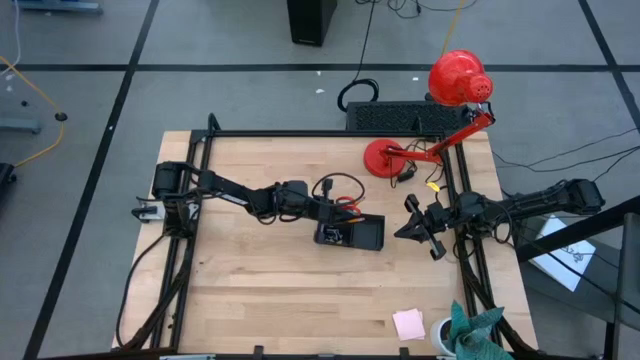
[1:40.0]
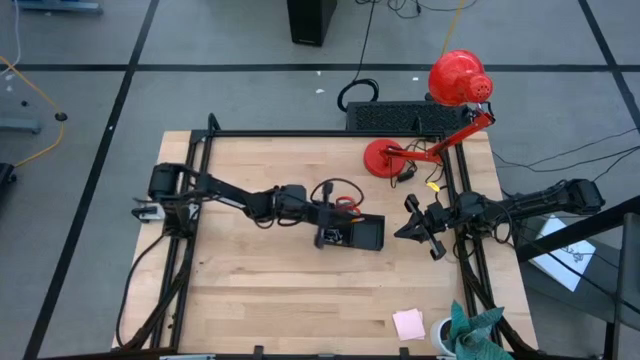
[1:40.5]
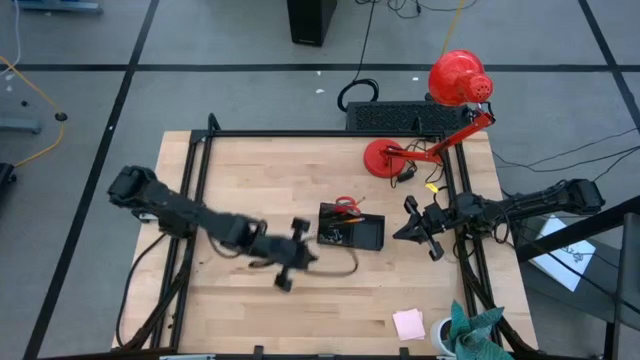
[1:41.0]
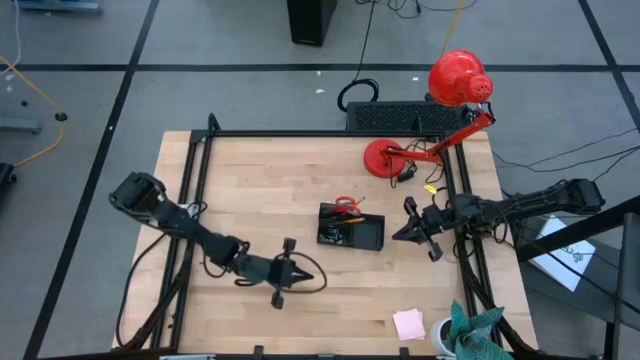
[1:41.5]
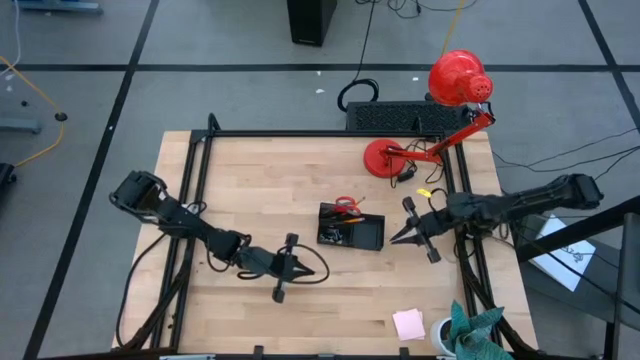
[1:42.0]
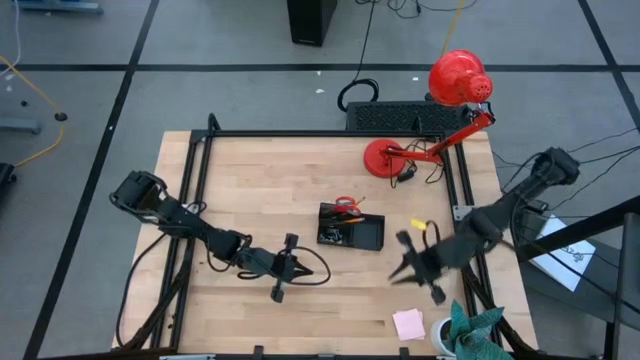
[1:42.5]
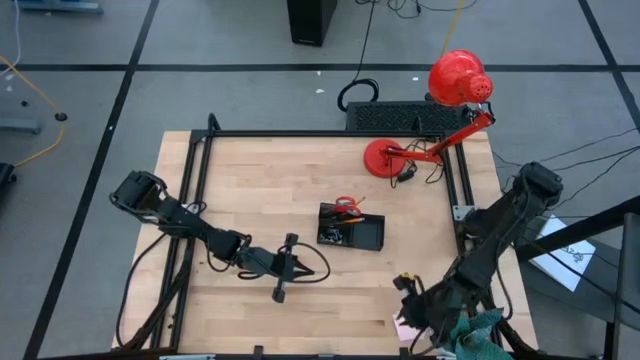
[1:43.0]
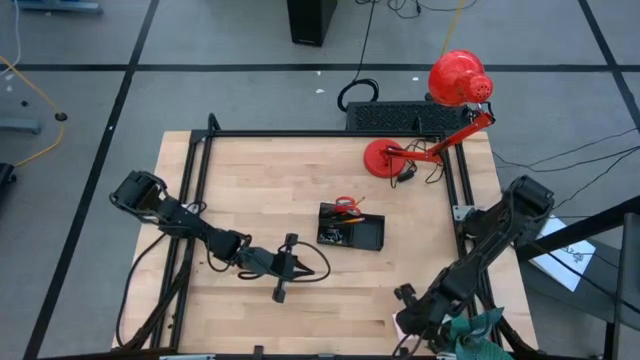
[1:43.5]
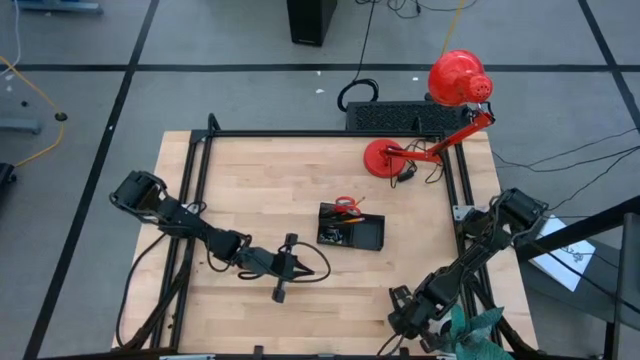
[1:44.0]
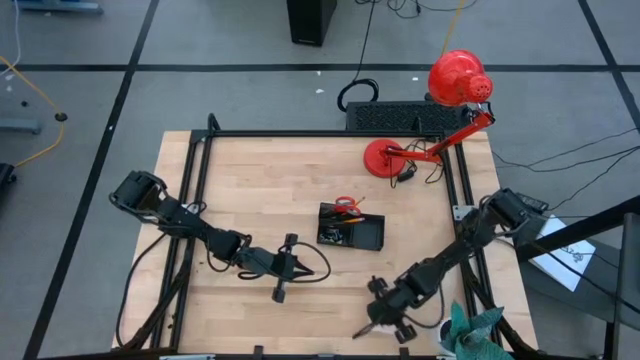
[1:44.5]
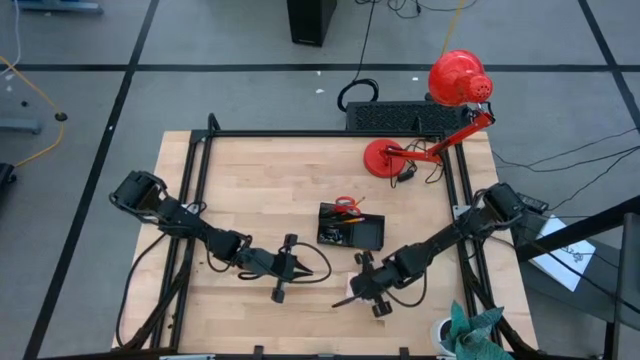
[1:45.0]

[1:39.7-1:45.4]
Task: Pick and place office supplies into organizer
Move the sticky notes to the center of the table

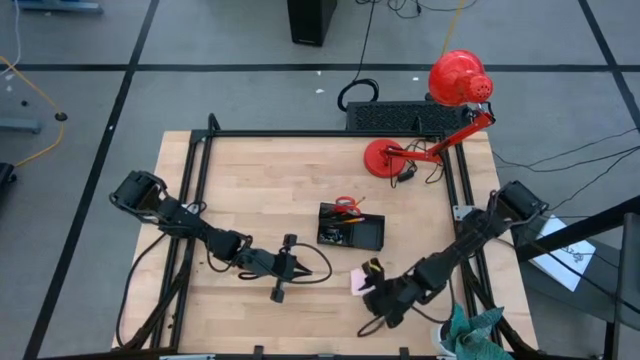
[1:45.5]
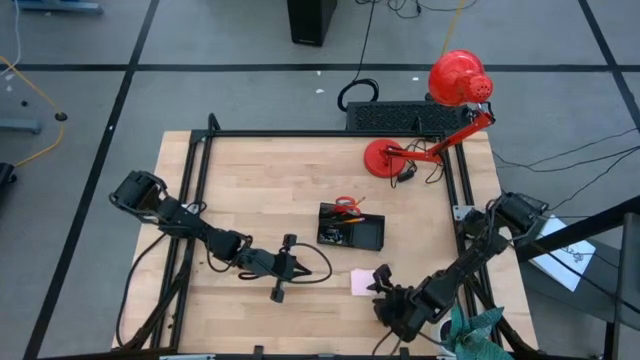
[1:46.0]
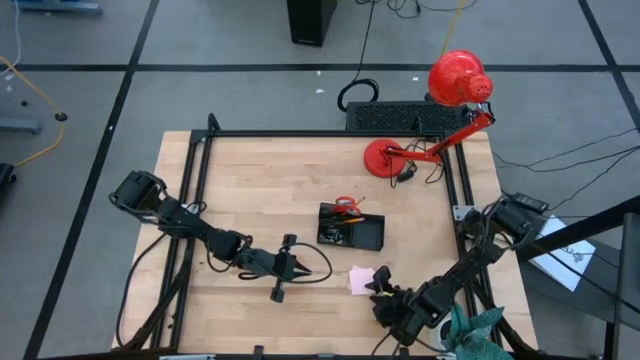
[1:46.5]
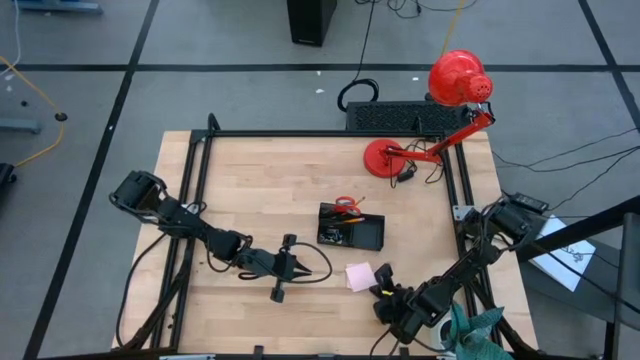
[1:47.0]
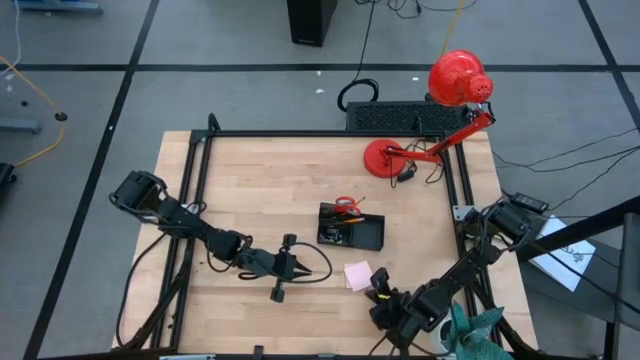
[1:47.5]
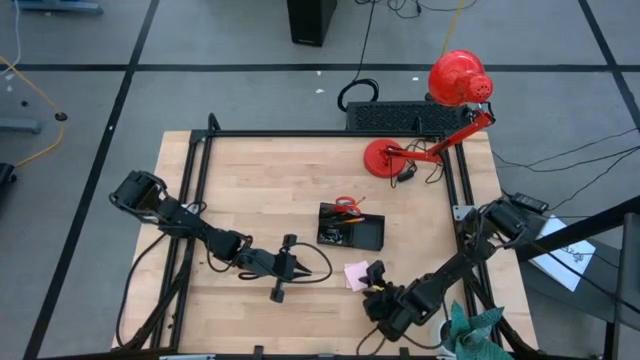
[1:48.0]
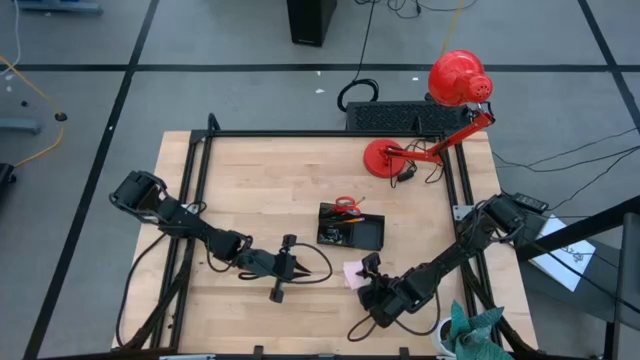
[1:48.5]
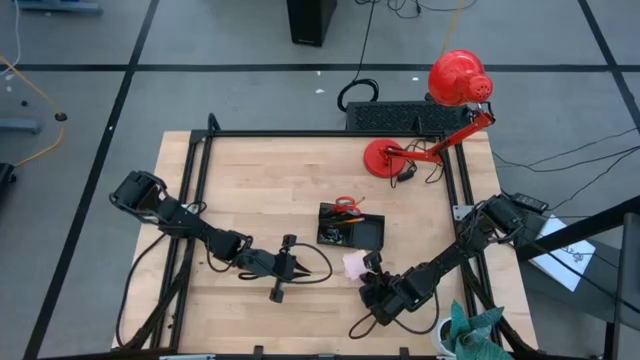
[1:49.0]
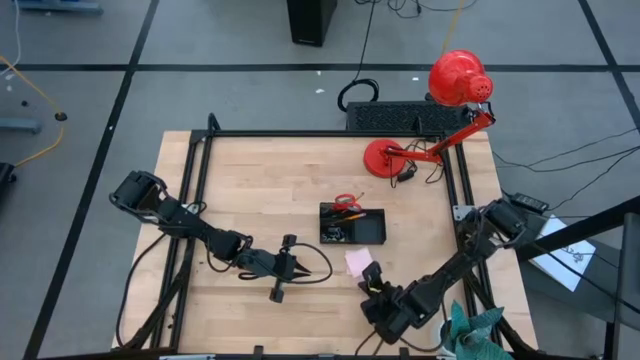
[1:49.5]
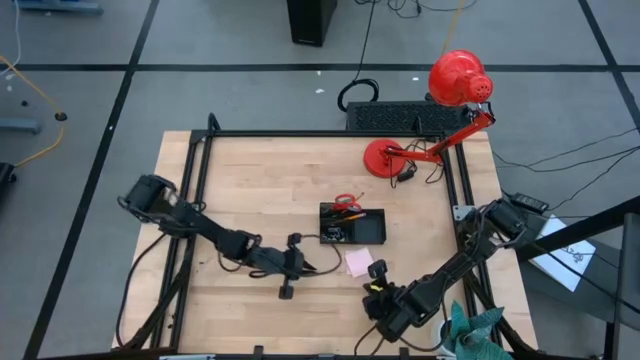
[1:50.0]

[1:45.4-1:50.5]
Put the sticky notes into the desk organizer

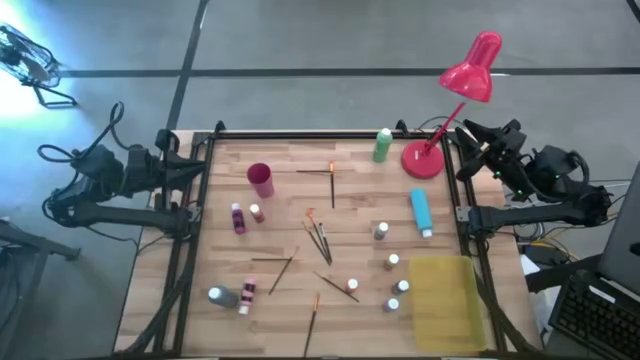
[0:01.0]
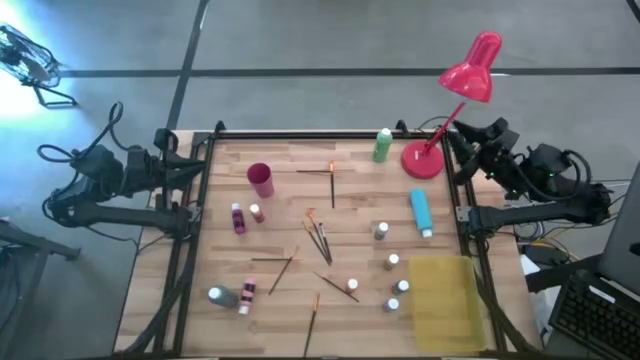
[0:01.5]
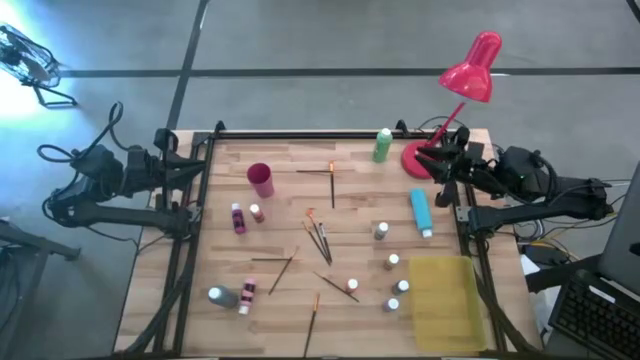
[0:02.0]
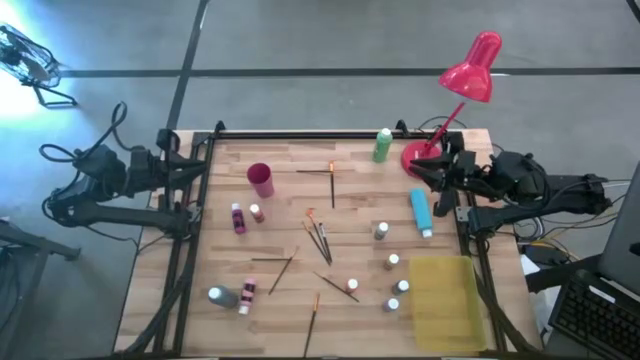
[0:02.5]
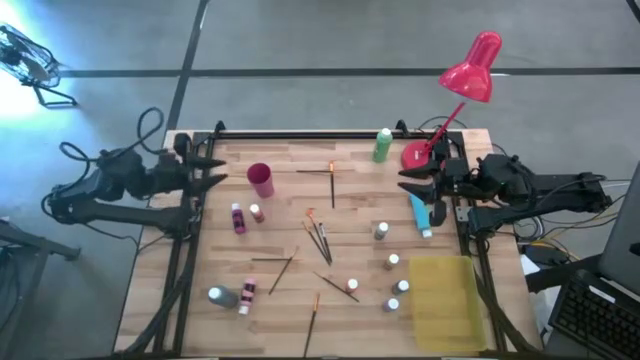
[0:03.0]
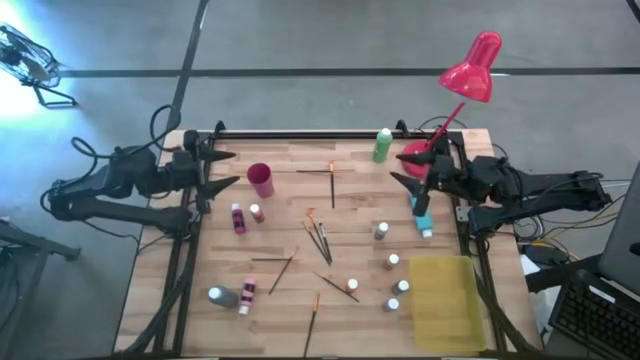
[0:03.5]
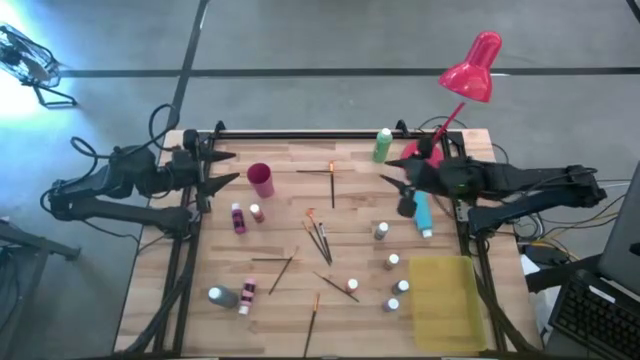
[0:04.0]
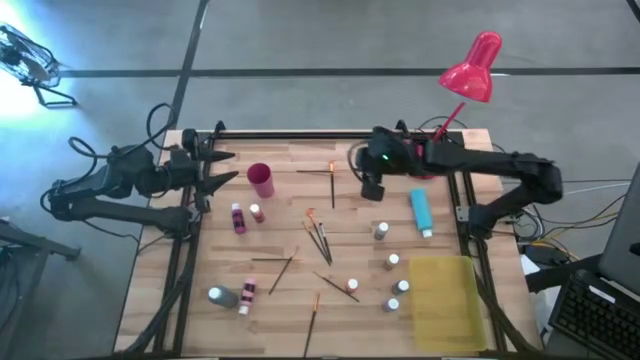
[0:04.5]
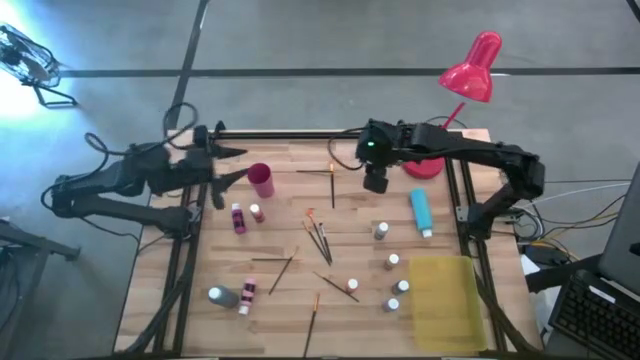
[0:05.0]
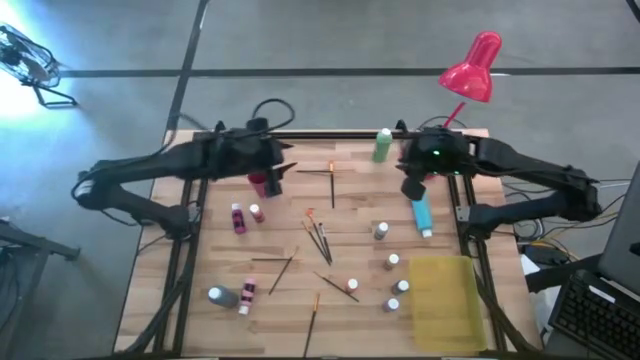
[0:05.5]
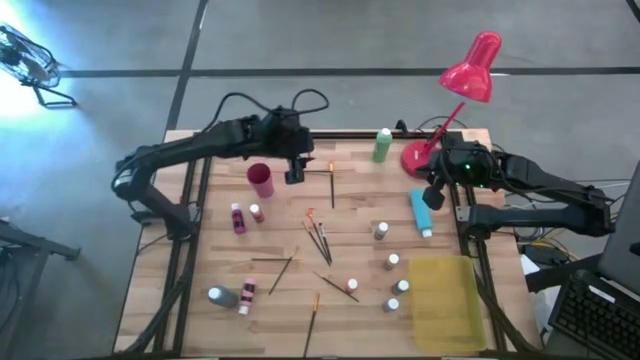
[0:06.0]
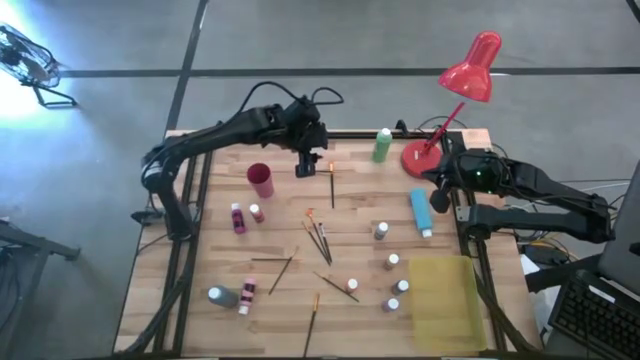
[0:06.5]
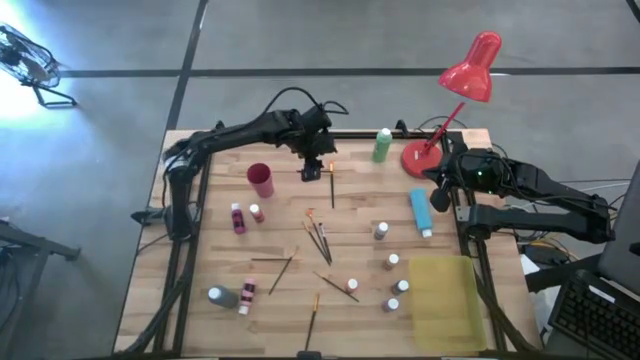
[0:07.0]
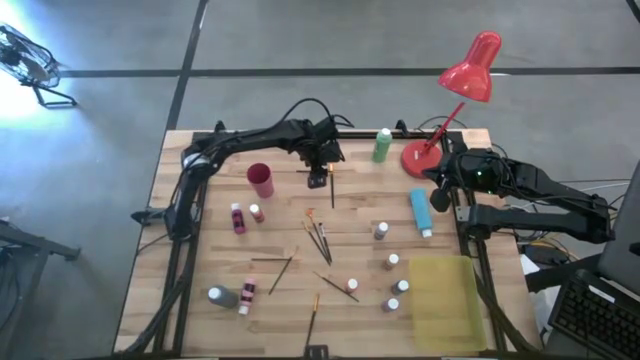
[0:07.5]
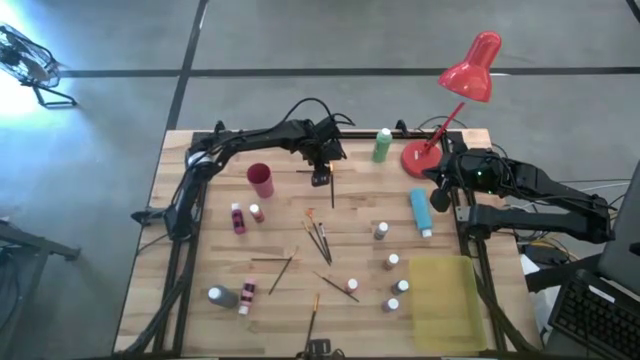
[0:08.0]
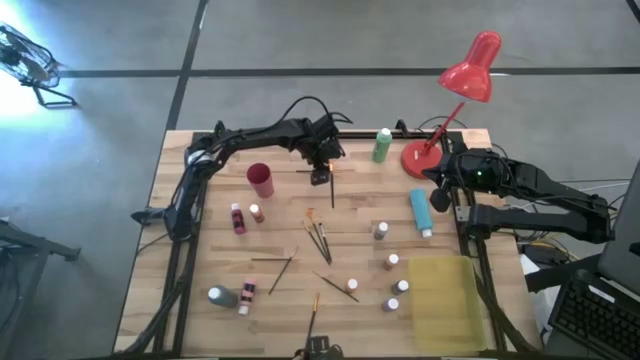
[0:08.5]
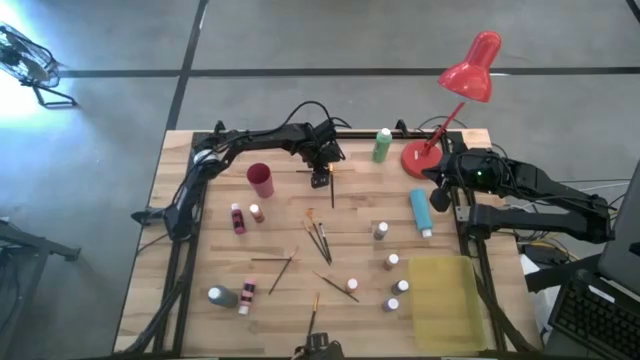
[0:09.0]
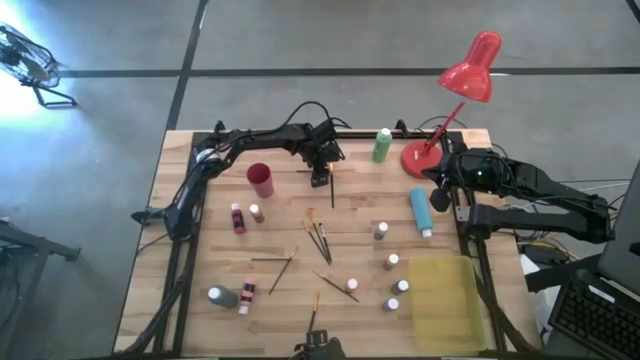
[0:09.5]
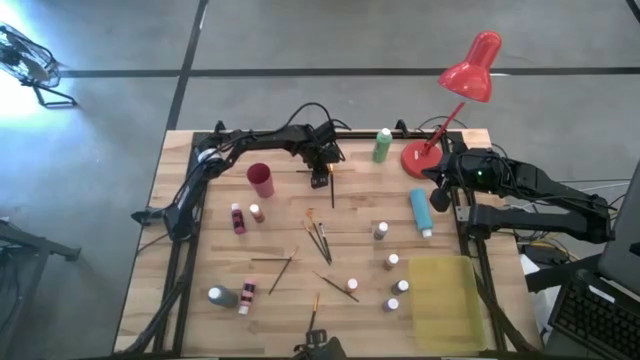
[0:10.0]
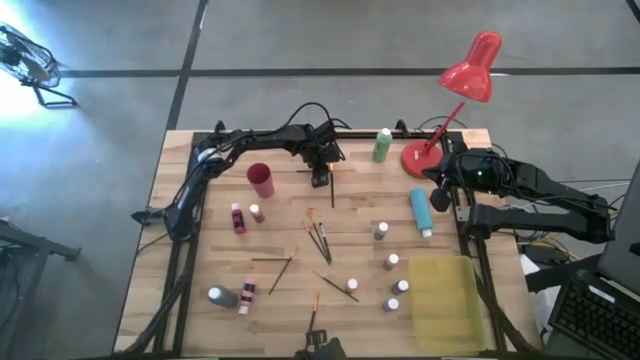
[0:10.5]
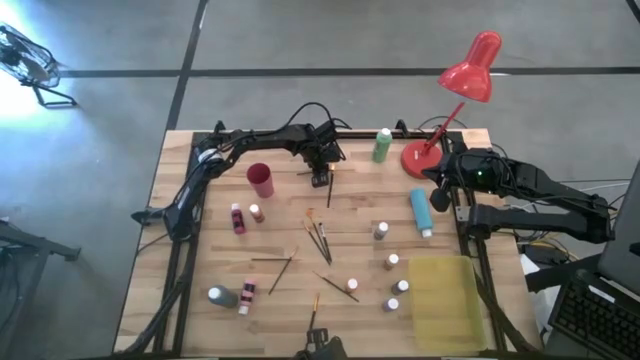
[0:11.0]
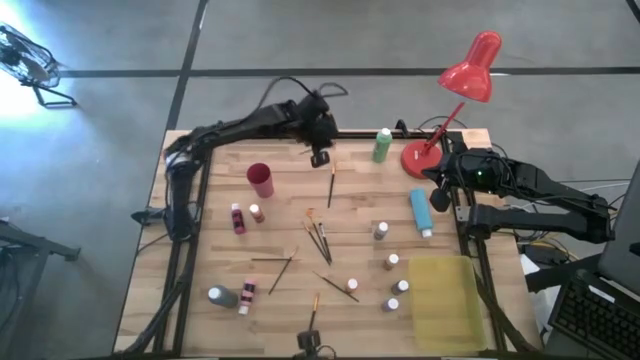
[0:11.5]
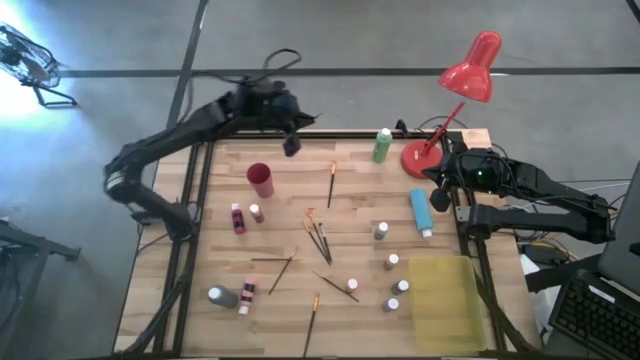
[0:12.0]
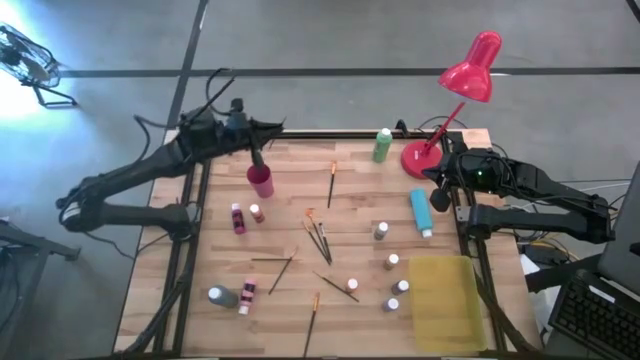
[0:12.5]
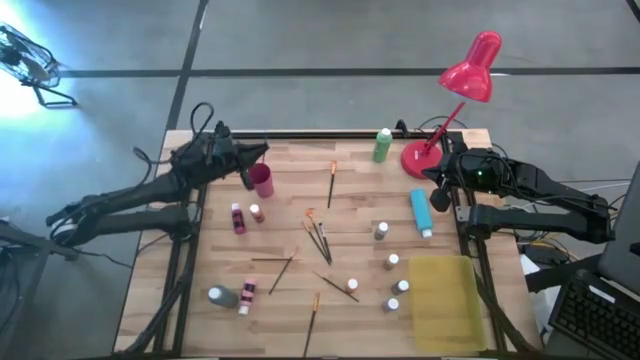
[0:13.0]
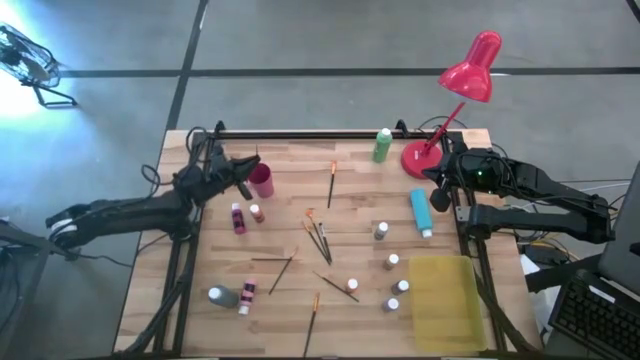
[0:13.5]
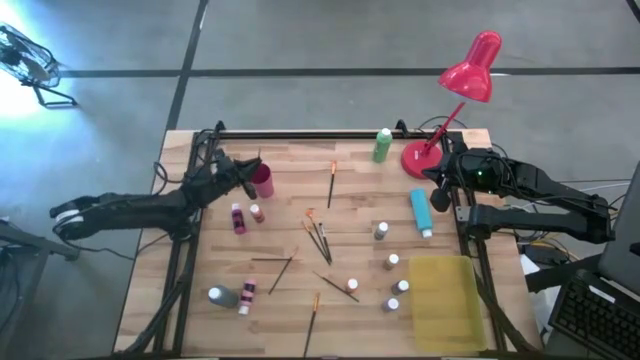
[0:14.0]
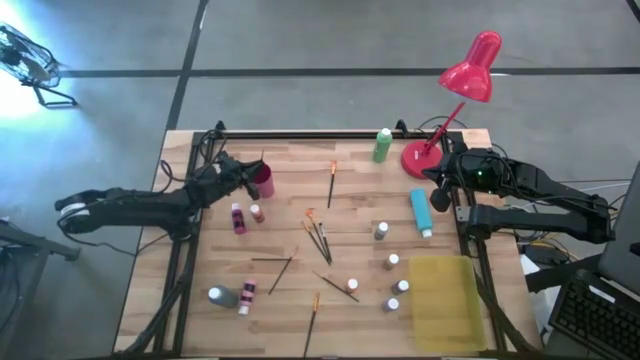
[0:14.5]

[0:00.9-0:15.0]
Task: Pick & Place Paint Supplies
Put the black paint brush into the pink cup
